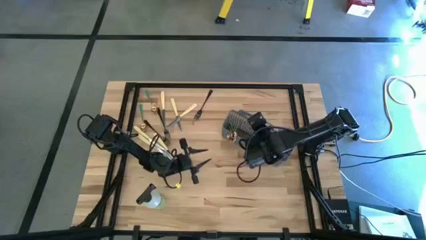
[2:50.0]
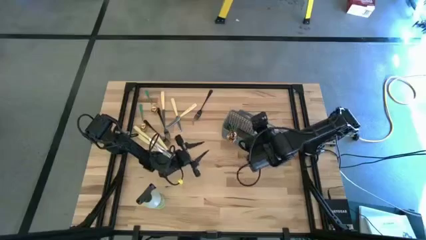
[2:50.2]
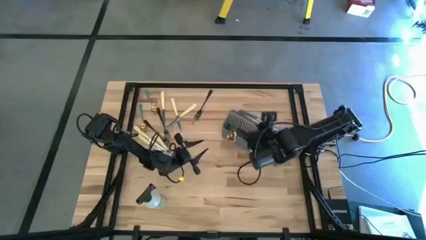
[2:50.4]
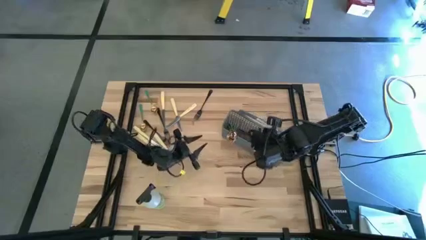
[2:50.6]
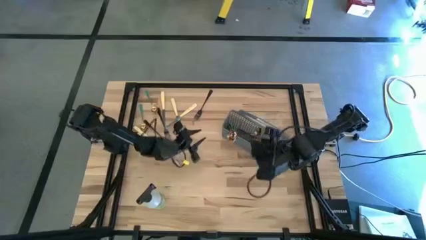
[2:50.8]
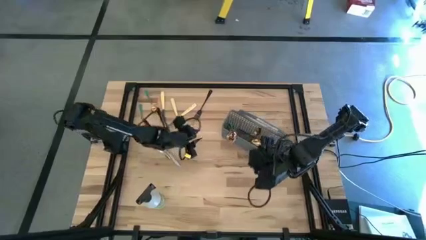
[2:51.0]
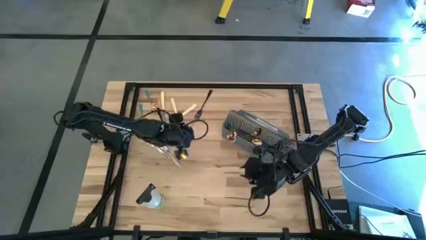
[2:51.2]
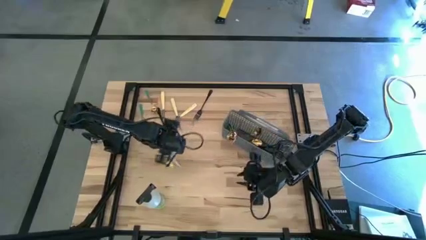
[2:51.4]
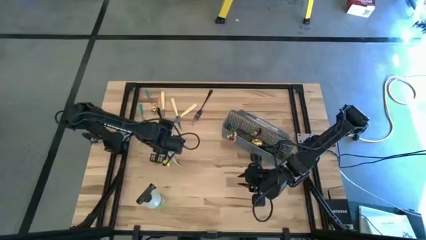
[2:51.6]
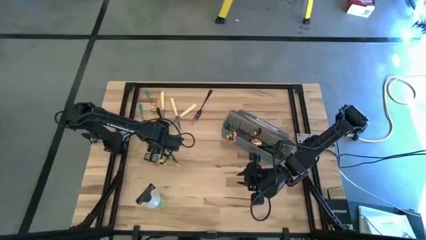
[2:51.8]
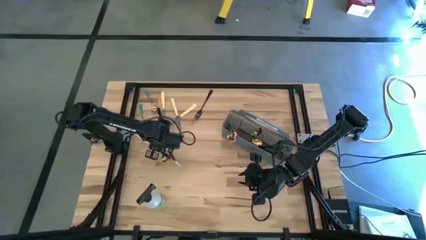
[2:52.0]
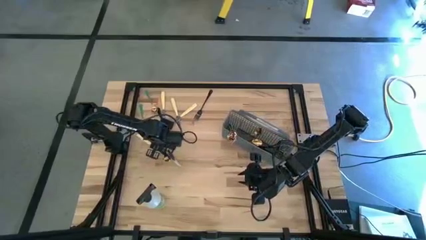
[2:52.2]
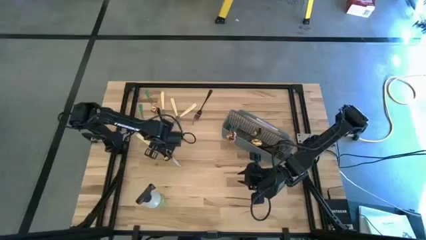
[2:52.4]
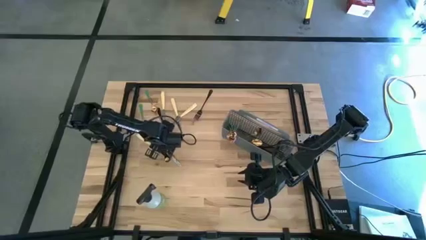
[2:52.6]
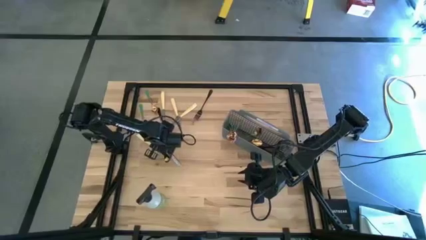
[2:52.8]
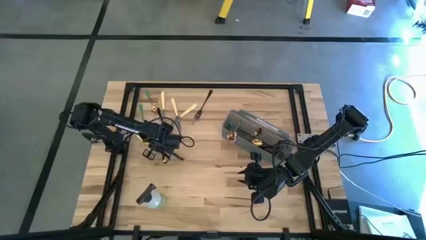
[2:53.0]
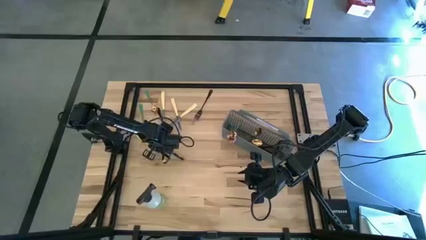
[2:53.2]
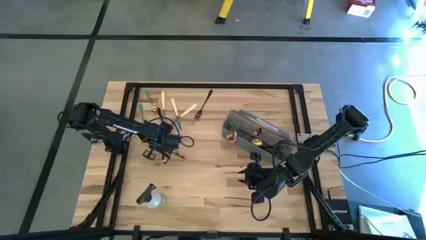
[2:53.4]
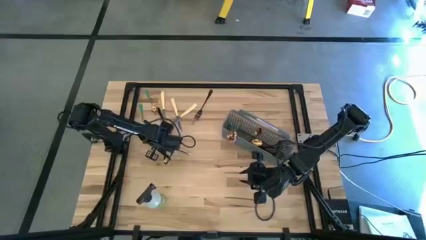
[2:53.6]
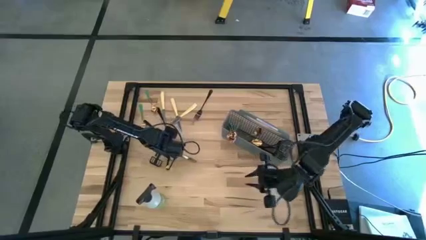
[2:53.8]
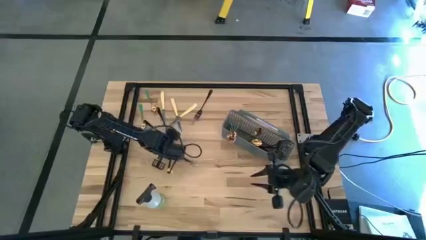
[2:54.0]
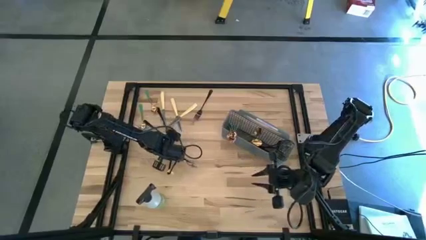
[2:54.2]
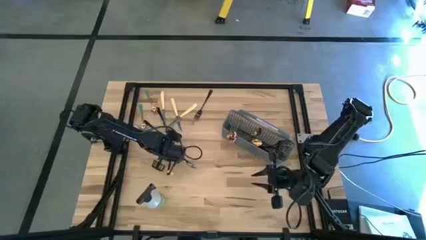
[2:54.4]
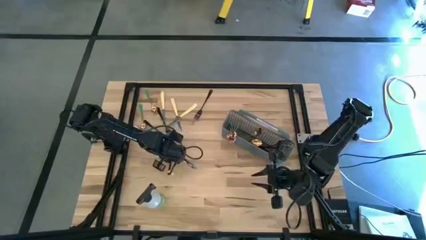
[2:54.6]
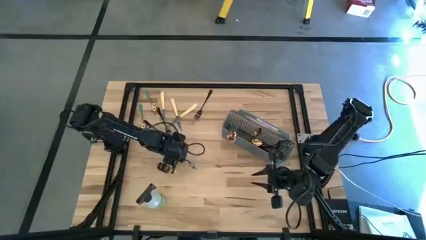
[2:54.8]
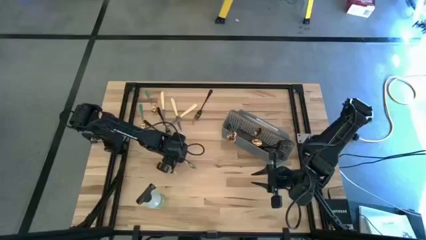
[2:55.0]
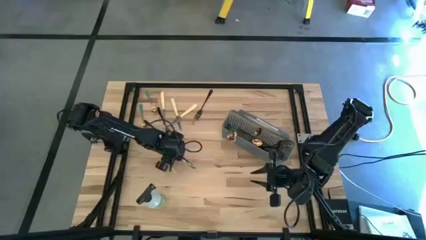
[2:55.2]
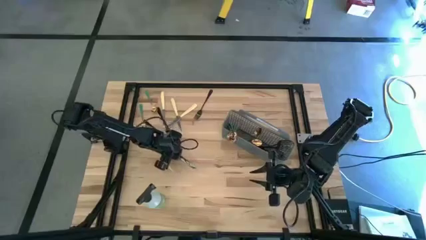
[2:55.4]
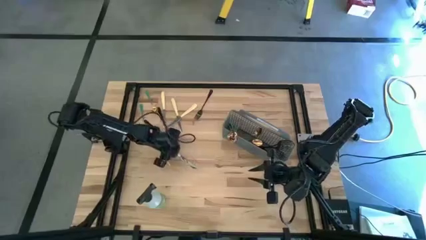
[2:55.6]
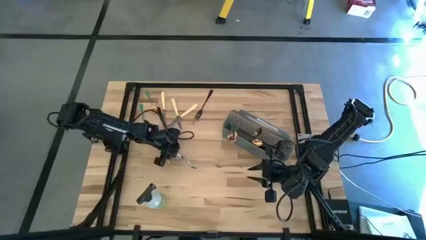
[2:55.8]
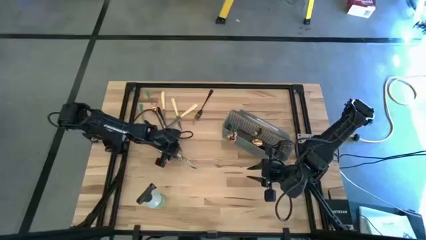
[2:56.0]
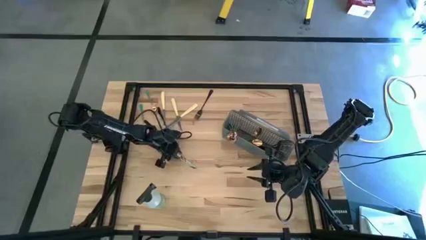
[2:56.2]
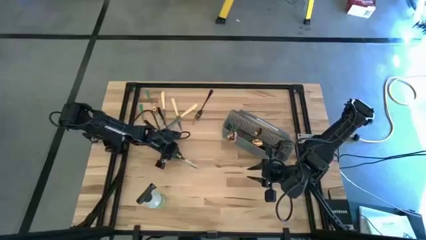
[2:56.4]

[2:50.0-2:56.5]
Task: Sort silverware
Put the silver knife into the cutlery rack

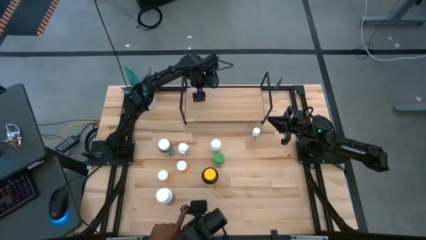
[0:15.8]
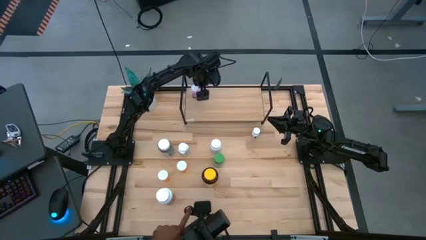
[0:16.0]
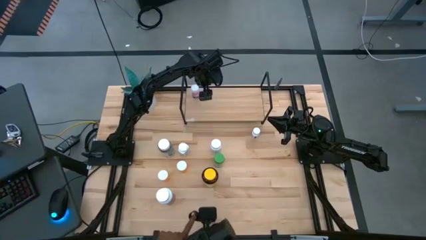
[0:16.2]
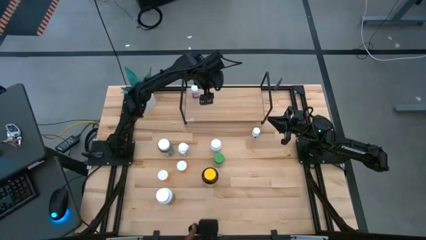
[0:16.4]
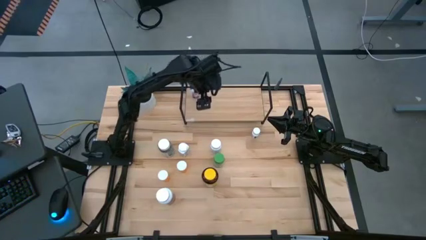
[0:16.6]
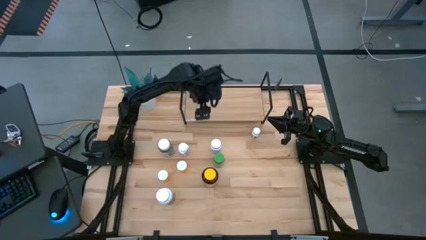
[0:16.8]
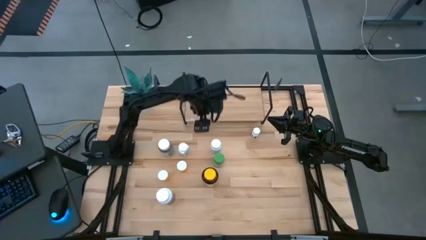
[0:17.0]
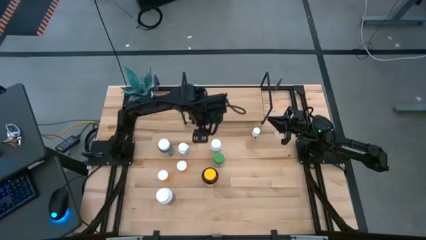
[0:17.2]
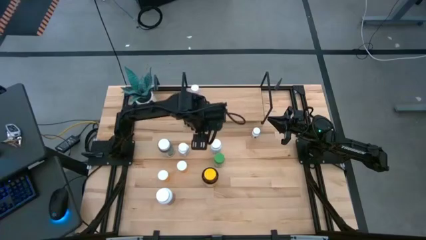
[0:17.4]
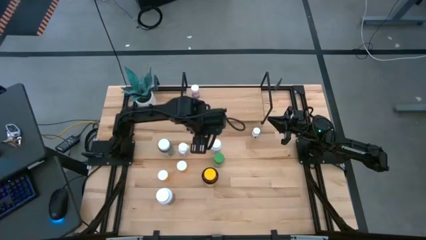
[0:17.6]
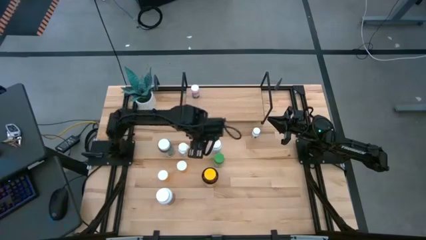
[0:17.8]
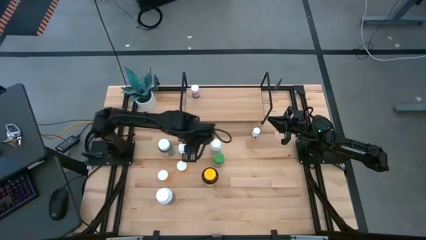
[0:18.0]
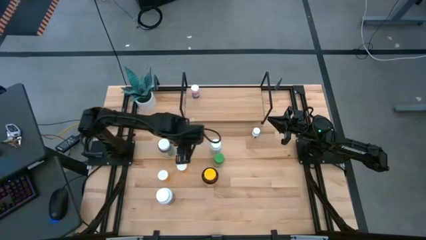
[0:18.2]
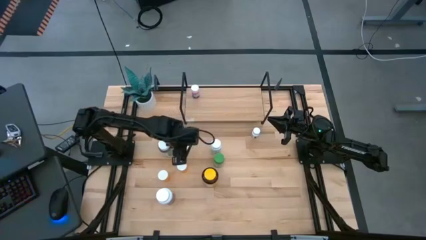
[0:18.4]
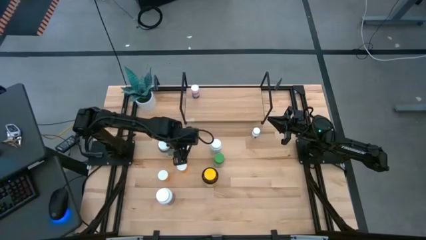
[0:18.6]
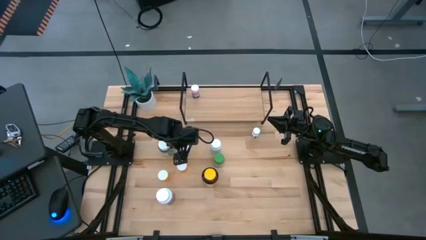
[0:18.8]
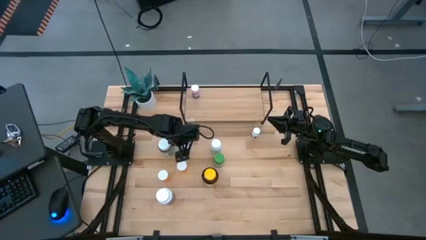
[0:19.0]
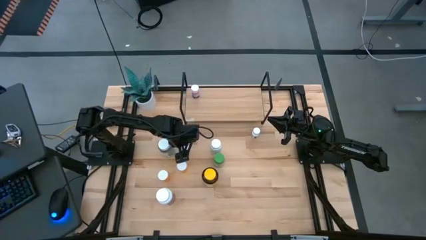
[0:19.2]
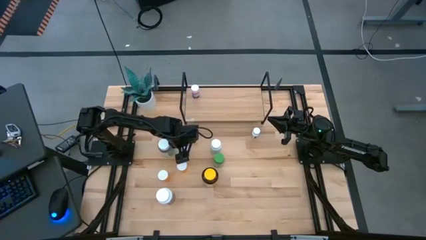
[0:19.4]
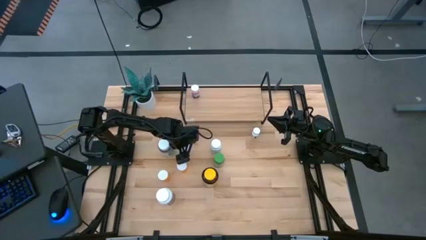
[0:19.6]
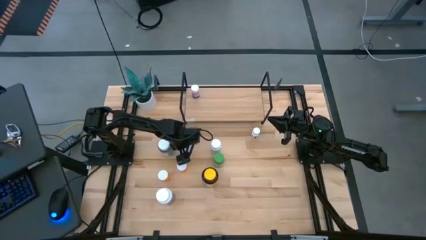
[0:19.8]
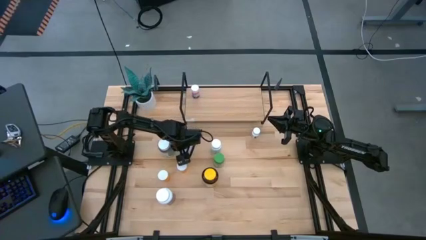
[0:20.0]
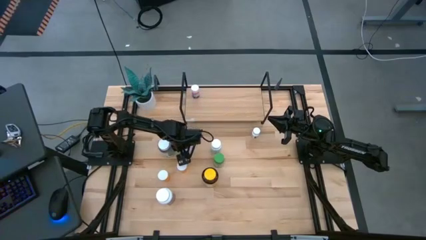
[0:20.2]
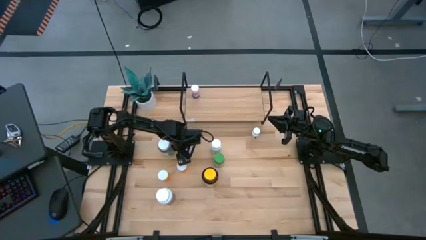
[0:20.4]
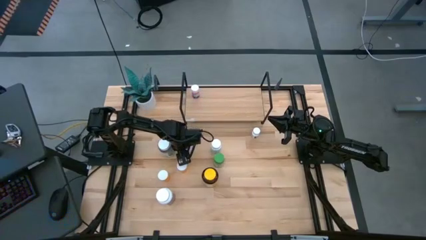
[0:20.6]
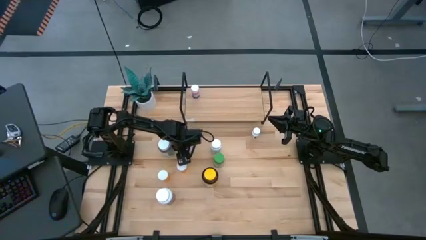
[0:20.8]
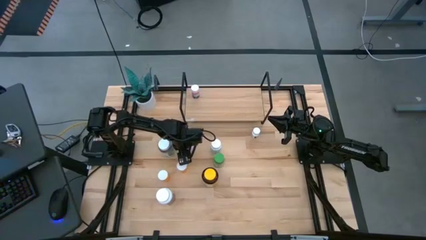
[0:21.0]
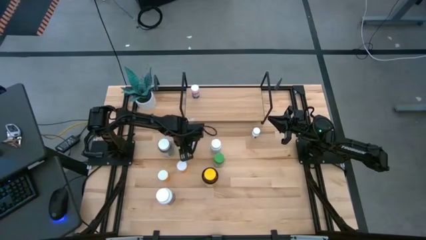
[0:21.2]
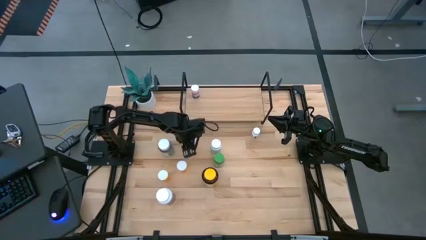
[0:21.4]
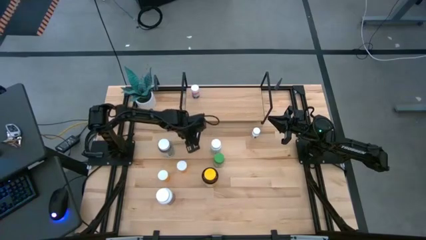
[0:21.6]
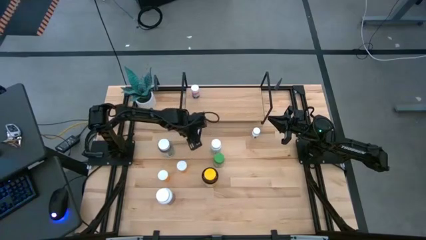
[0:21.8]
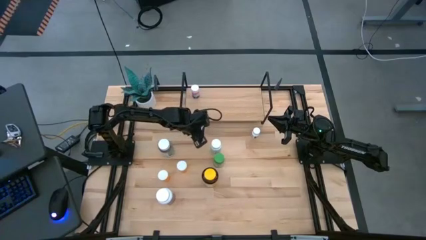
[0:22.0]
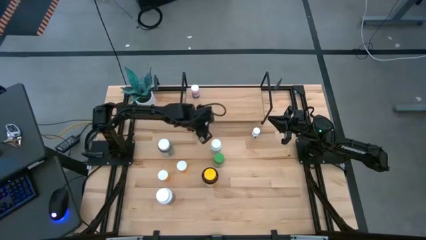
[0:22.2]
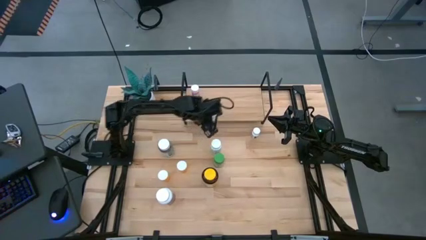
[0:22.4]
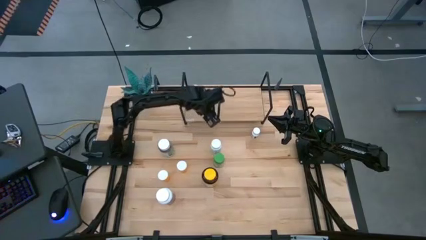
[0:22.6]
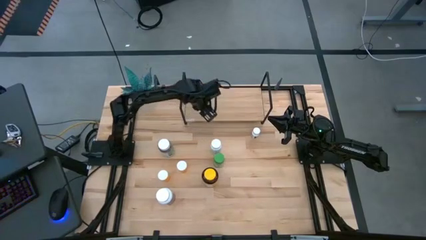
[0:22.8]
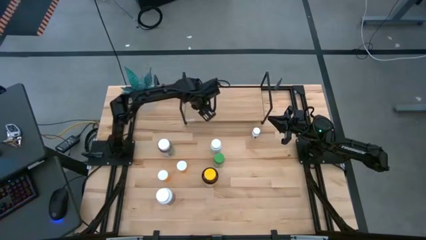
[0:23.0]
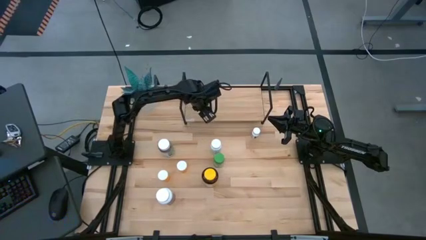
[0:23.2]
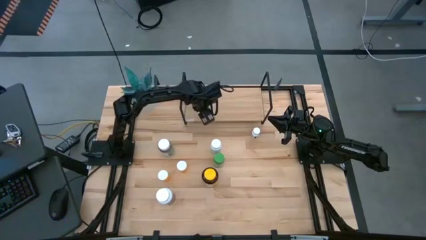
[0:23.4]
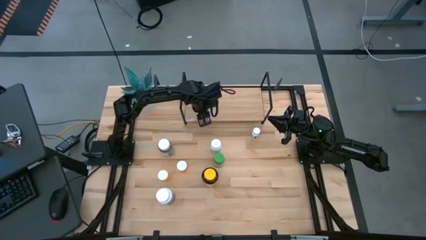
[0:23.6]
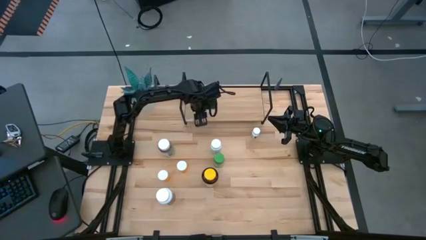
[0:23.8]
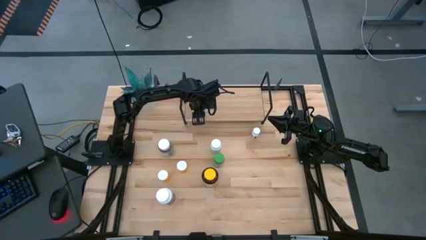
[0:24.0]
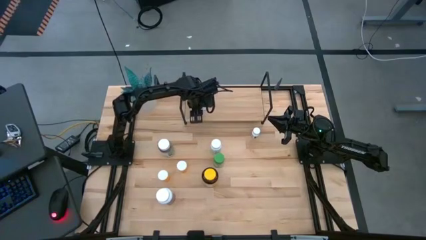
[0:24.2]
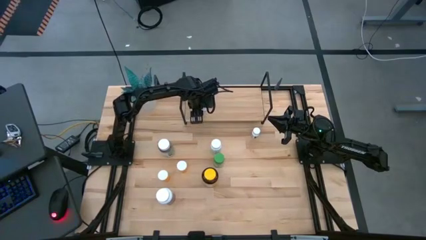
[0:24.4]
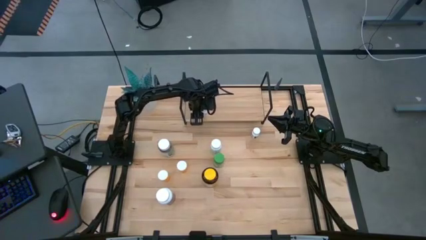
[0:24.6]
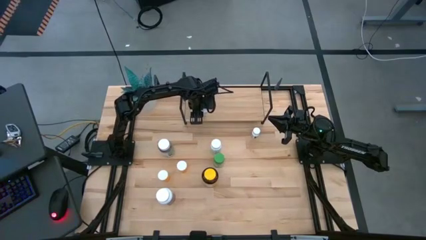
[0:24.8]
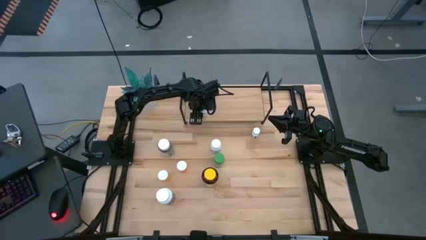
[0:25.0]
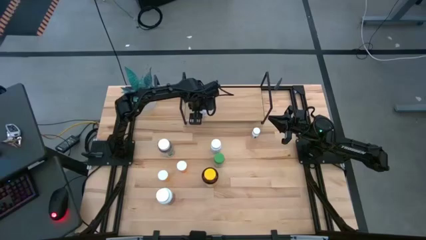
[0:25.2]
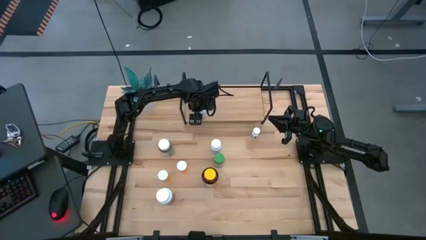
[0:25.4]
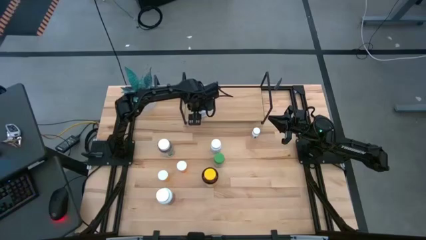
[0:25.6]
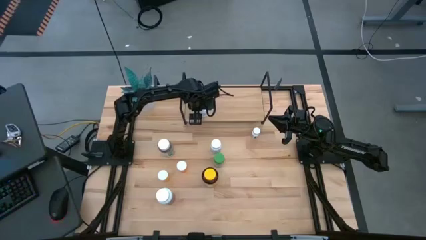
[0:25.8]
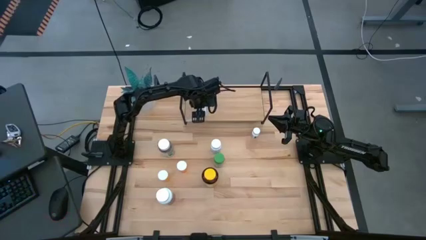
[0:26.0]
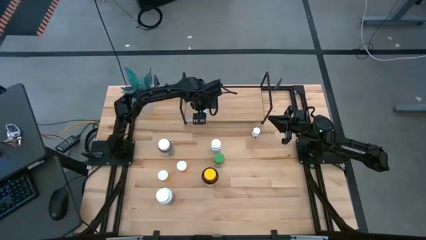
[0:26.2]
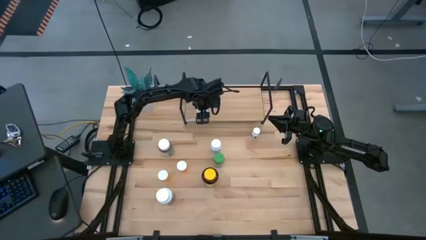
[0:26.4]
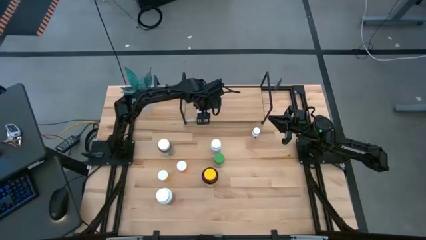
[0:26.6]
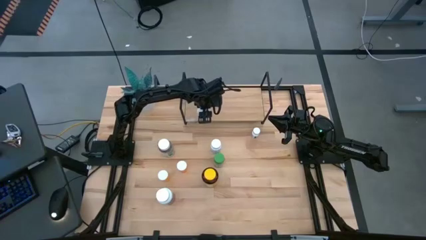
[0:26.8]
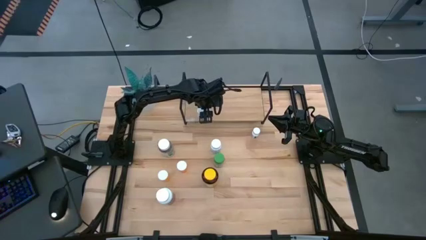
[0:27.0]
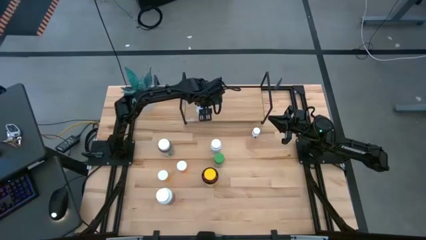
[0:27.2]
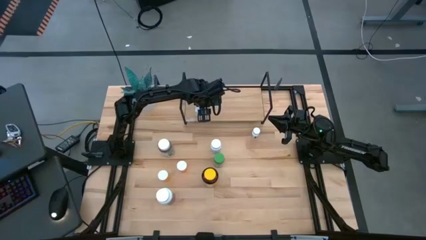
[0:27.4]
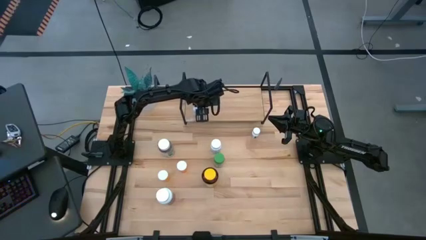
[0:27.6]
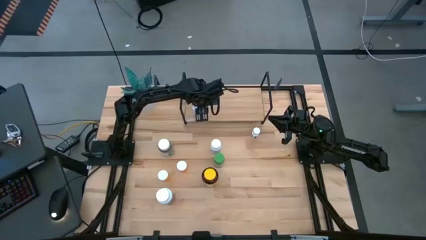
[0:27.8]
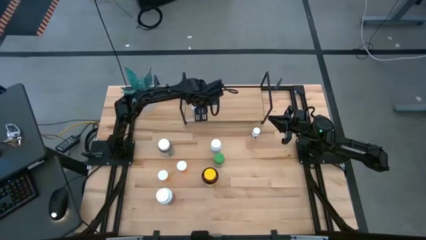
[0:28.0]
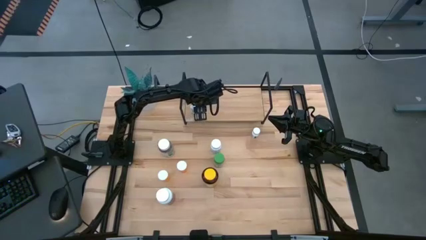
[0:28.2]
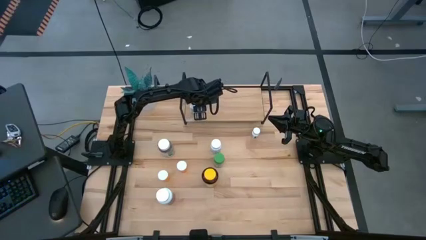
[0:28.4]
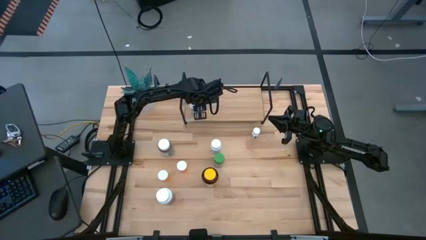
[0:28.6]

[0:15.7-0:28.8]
Task: Pick and place medicine bottles onto shelf by color
Put the blue pill bottle on the shelf
